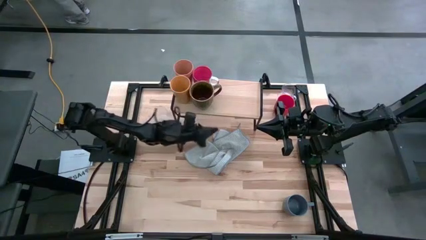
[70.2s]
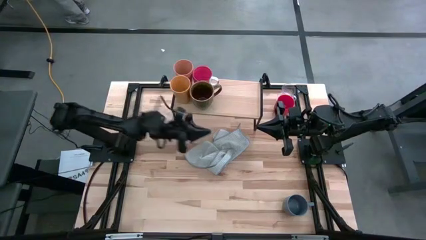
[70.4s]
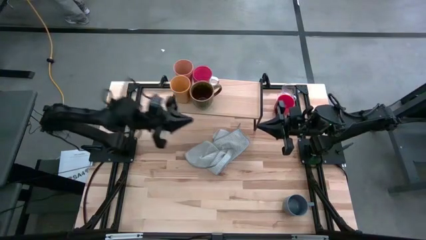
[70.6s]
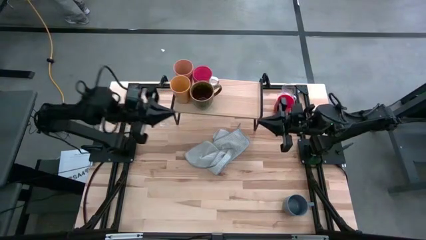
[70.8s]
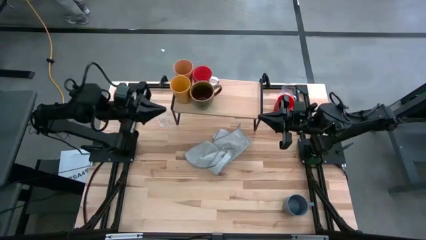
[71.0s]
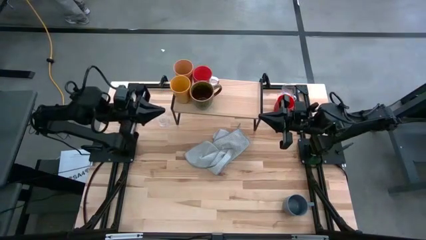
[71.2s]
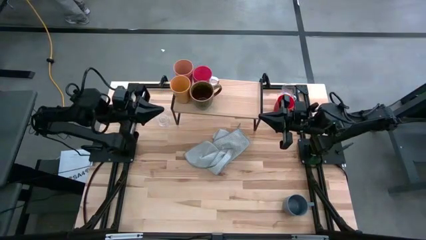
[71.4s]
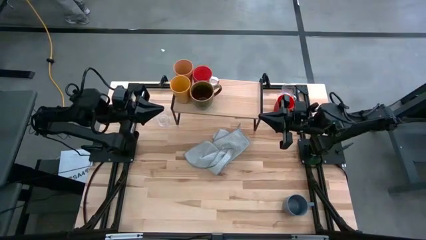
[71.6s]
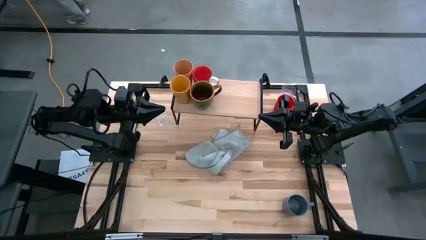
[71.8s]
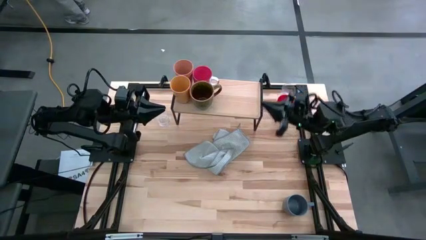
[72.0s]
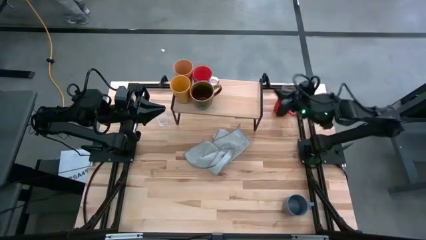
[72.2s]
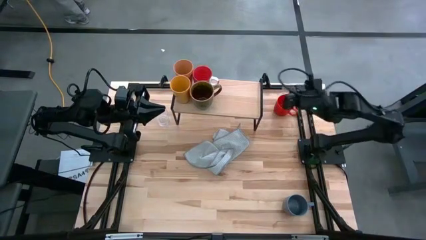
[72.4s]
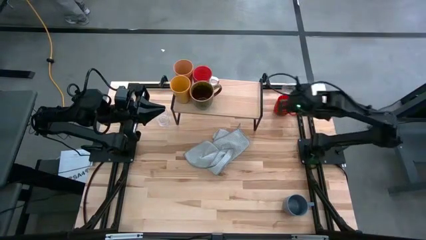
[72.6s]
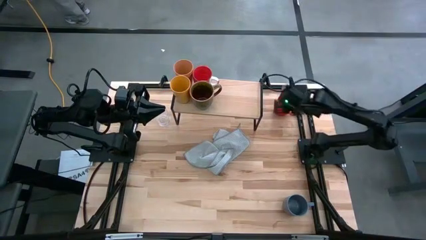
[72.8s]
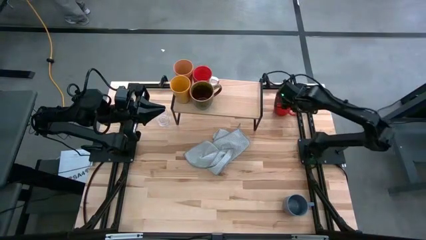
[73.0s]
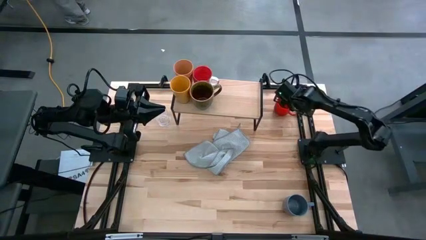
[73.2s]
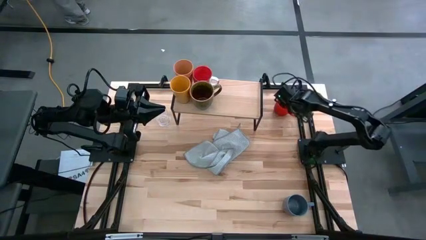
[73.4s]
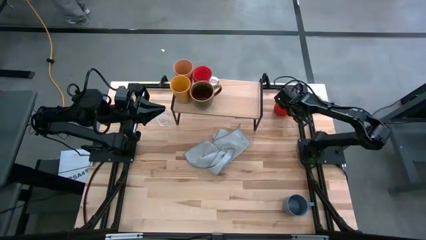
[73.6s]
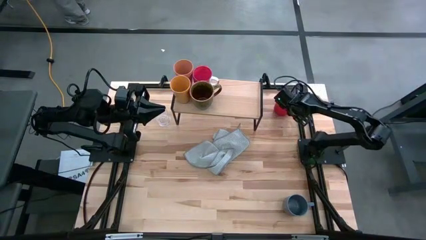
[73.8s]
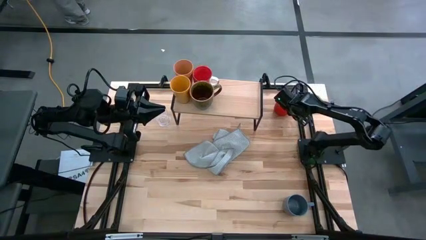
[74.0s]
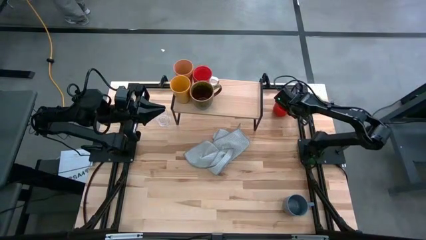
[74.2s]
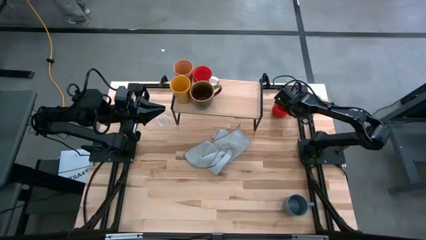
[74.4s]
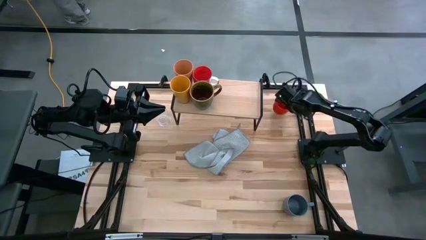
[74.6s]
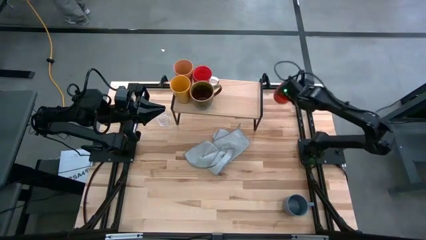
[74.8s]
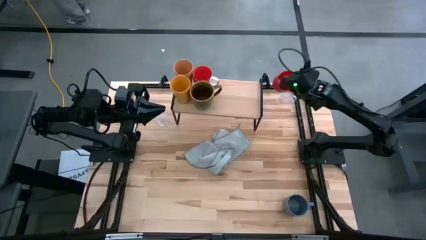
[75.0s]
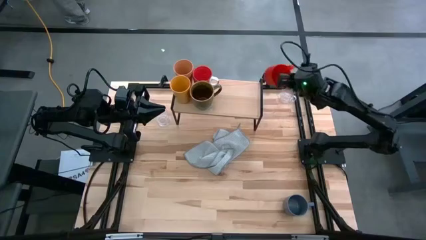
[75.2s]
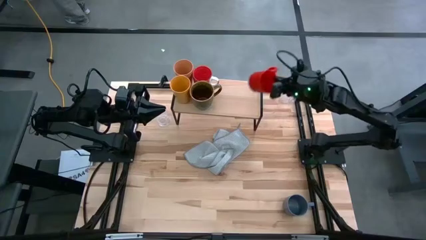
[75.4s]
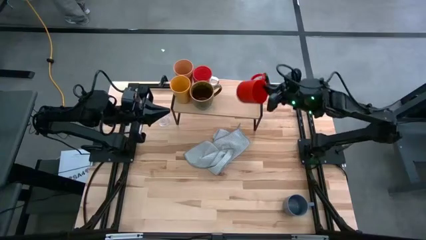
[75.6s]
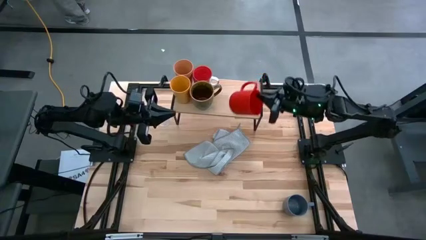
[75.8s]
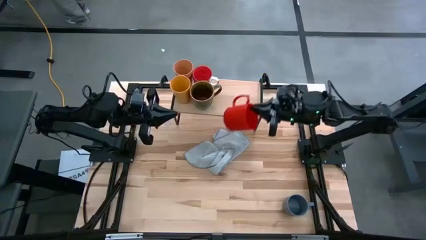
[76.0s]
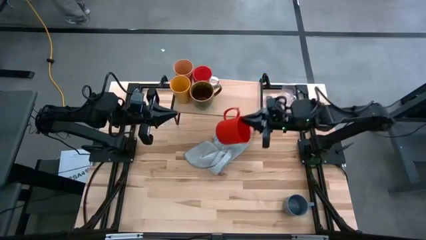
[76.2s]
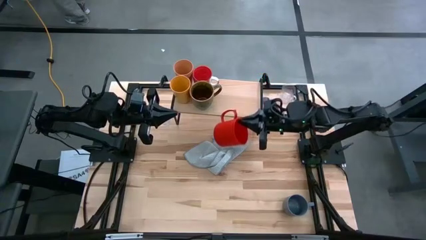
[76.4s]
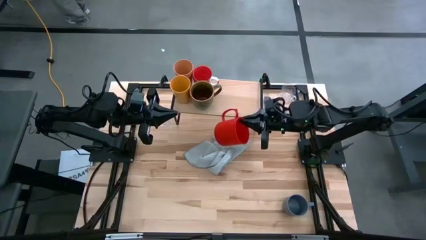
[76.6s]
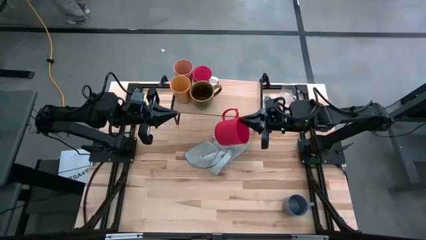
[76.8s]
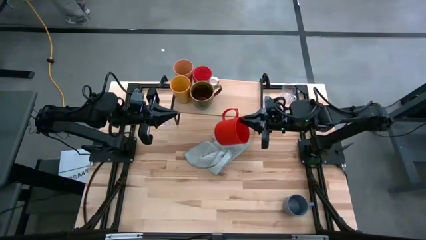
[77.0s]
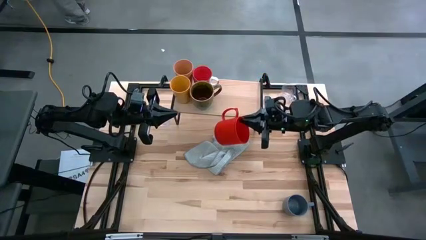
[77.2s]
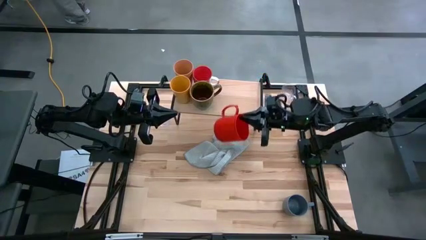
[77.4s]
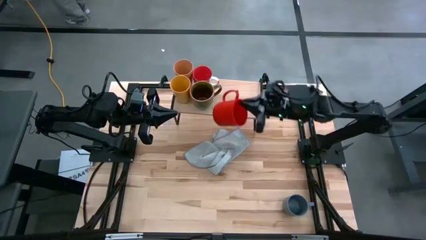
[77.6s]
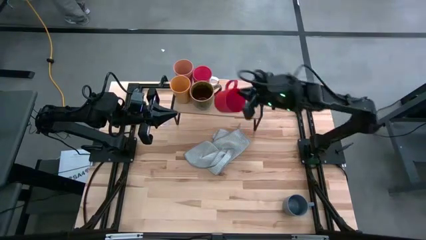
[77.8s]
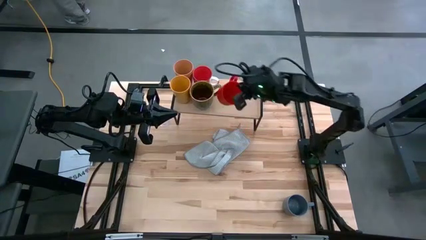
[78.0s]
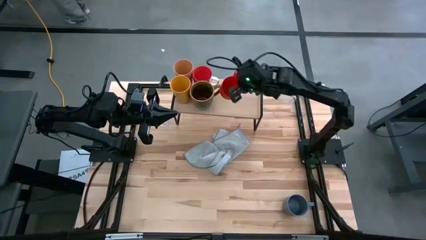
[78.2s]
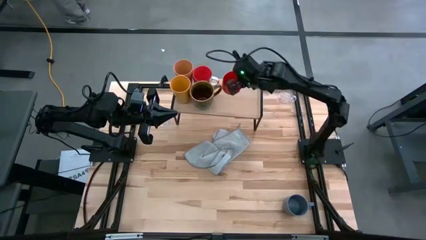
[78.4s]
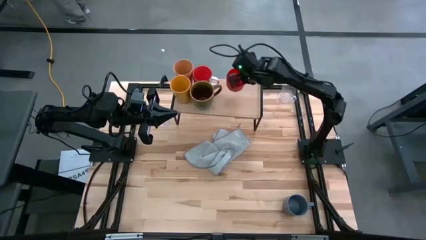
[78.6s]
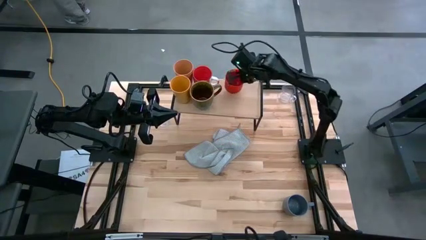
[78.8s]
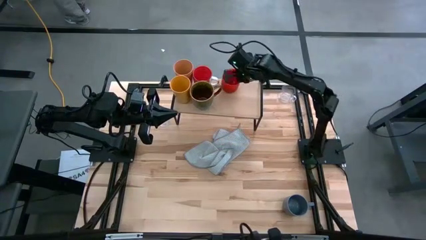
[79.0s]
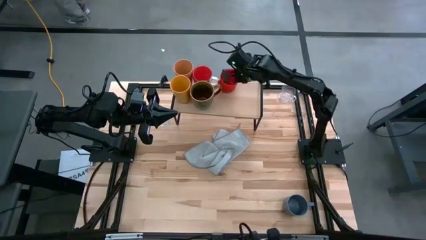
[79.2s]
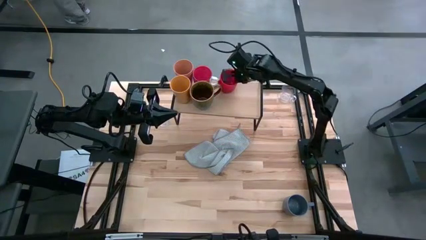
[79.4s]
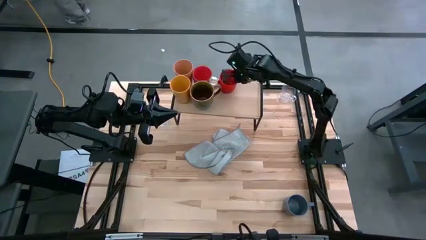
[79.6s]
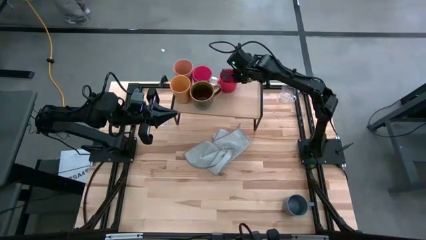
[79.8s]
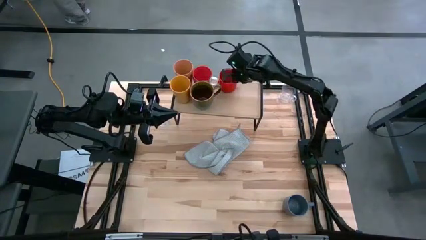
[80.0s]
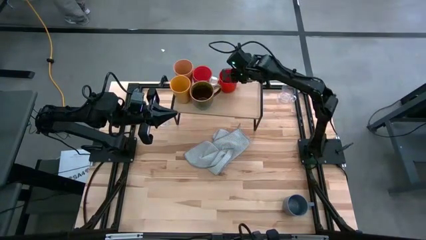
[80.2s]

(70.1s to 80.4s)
Task: Stack small to large cups/mugs on shelf
Put the red mug on the shelf

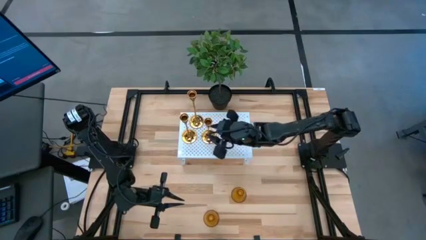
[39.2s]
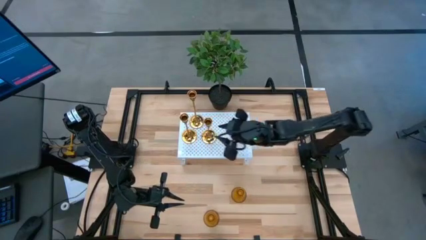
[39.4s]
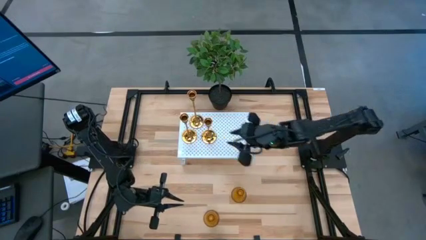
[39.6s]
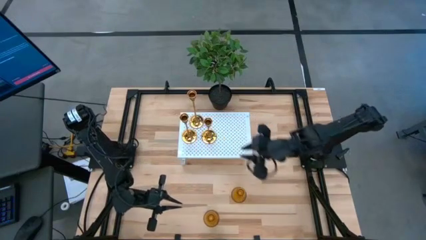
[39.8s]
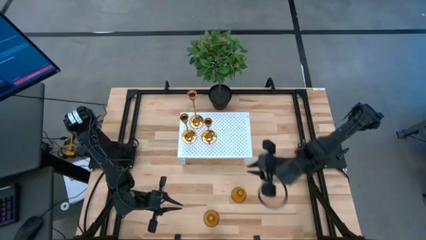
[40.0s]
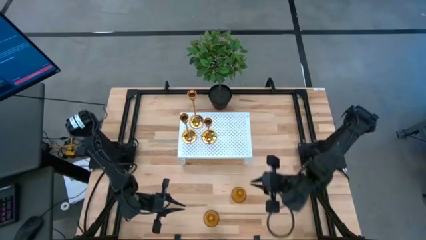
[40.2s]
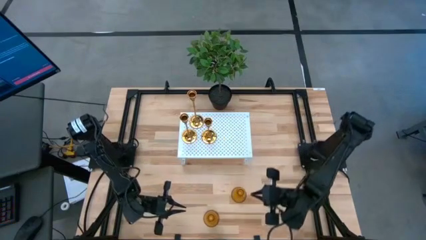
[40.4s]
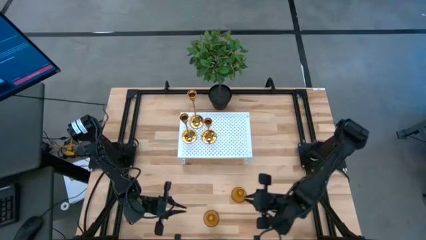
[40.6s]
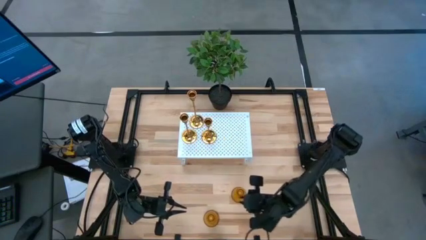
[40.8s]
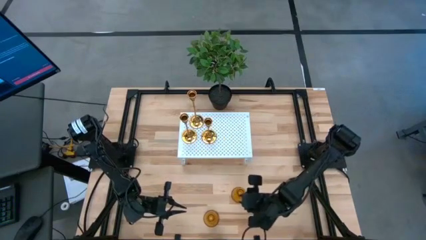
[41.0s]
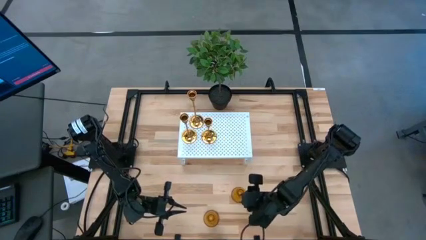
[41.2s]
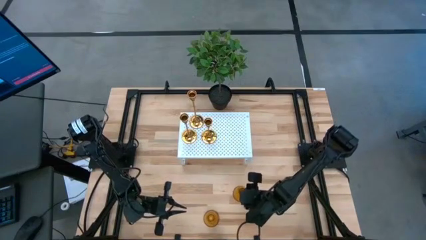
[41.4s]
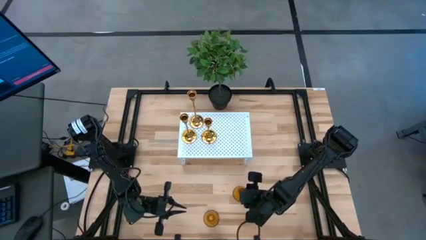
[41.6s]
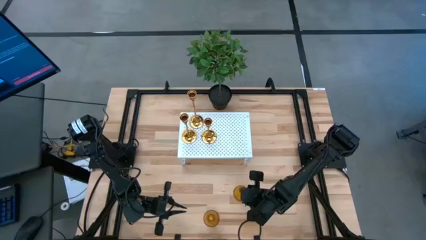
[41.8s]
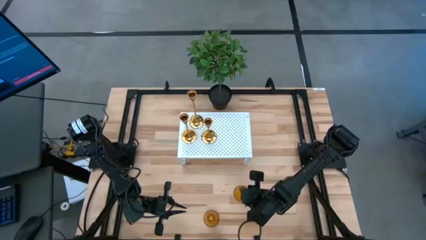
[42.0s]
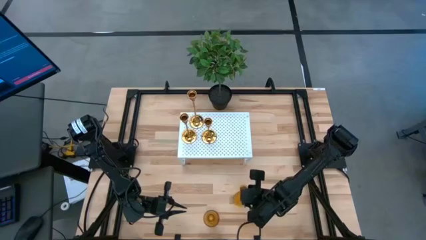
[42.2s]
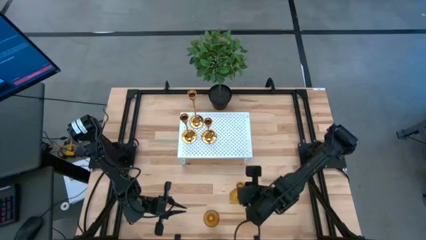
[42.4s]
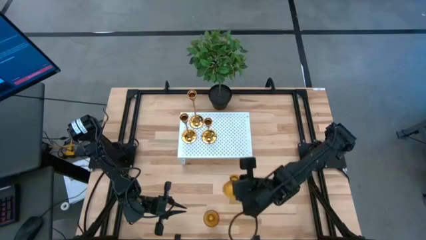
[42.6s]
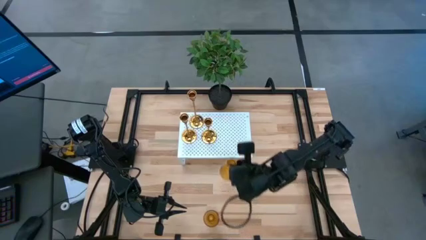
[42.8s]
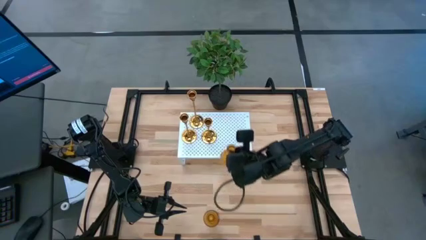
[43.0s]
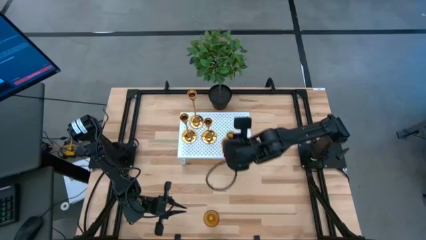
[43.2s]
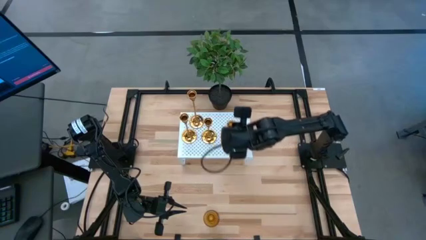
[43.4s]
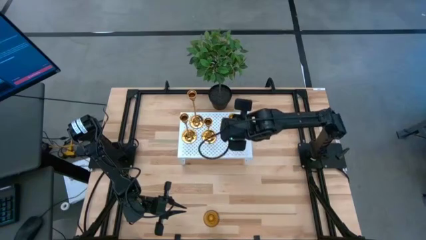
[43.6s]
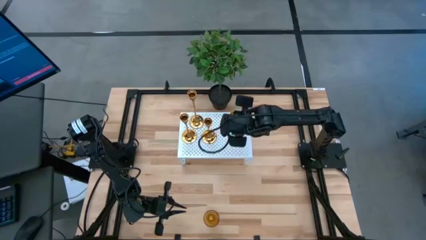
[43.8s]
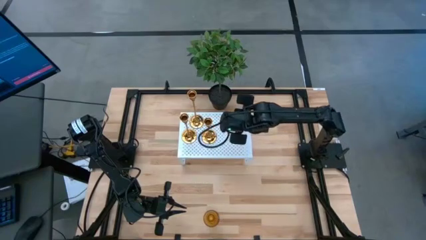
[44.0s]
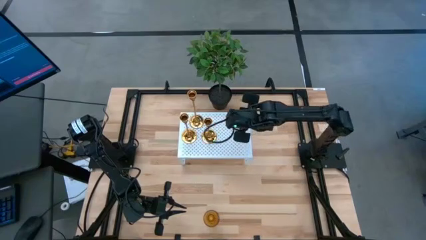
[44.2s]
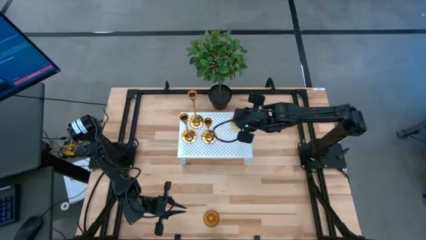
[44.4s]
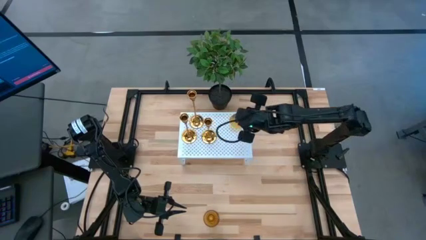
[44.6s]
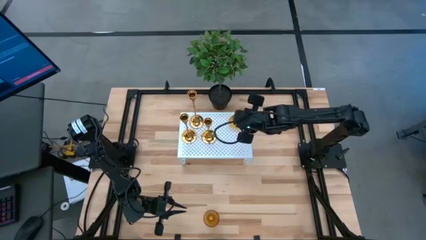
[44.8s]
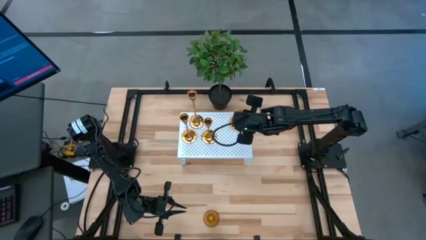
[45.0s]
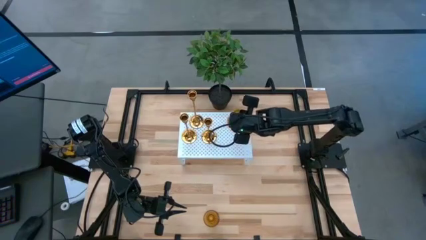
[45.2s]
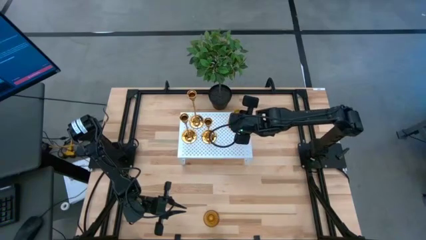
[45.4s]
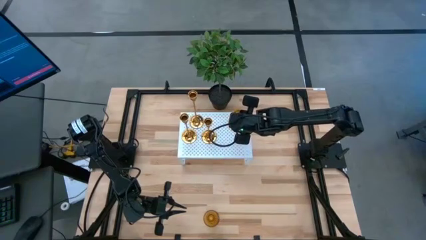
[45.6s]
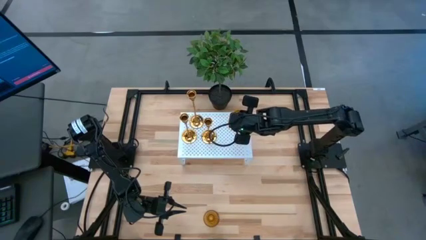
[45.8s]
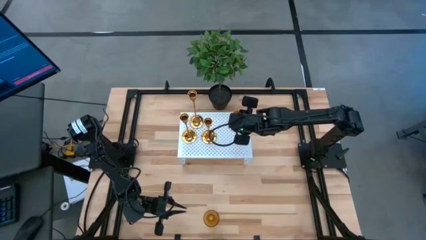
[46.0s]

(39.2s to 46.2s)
Task: Pick & Place candle stick holders
Put the top brown candle holder on the shelf
